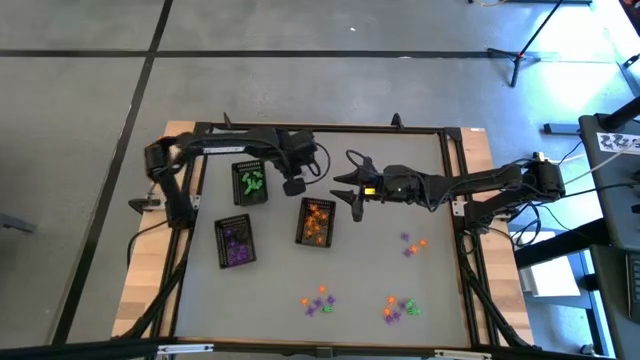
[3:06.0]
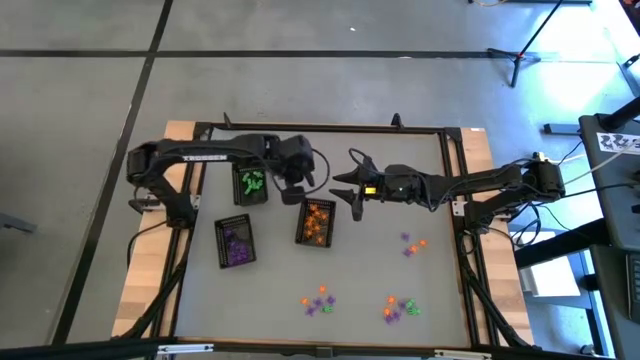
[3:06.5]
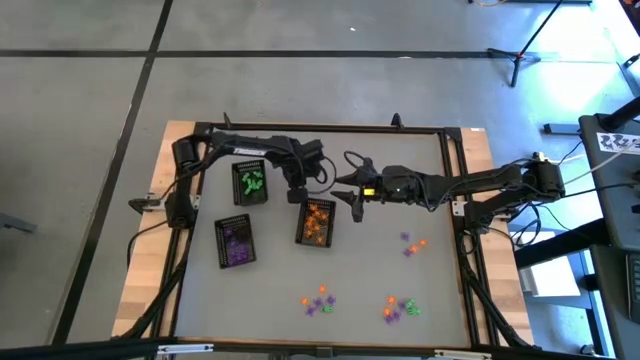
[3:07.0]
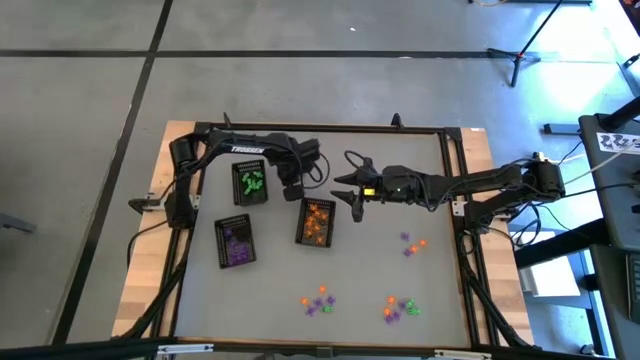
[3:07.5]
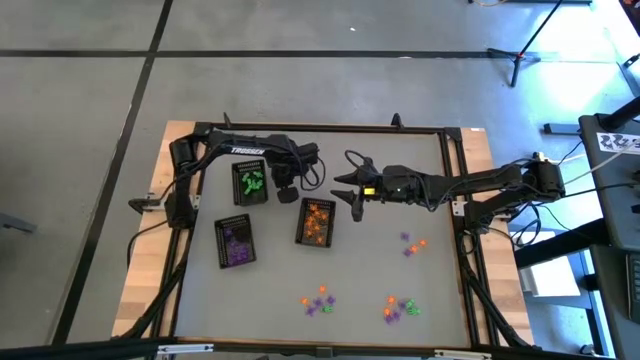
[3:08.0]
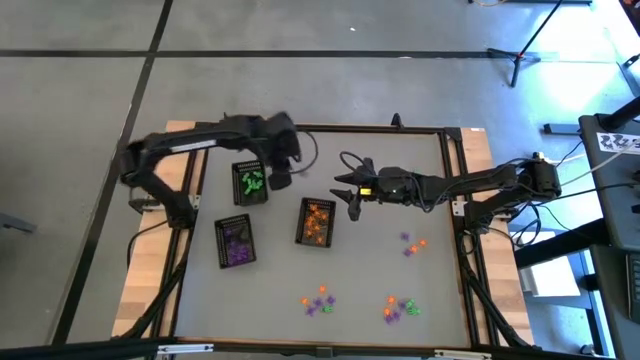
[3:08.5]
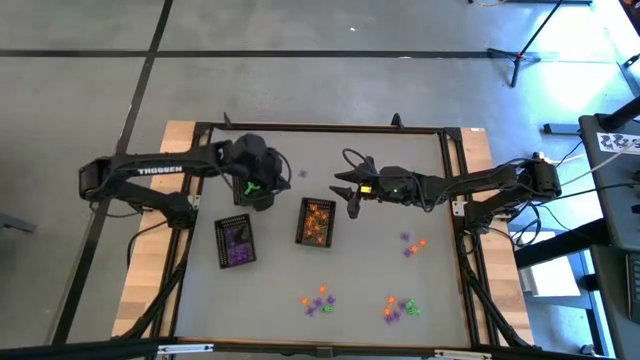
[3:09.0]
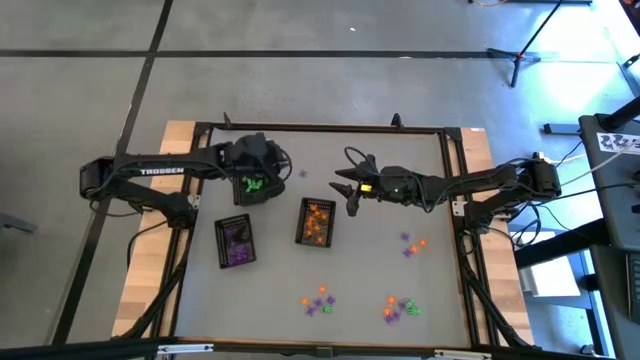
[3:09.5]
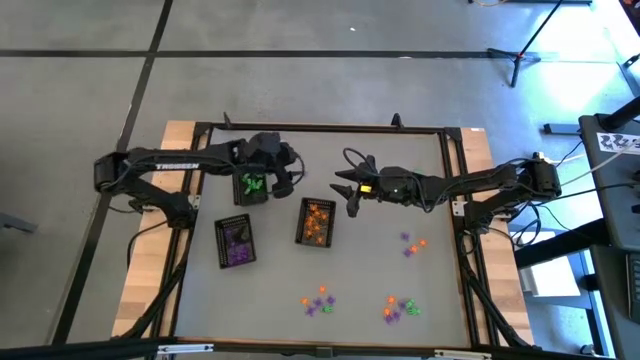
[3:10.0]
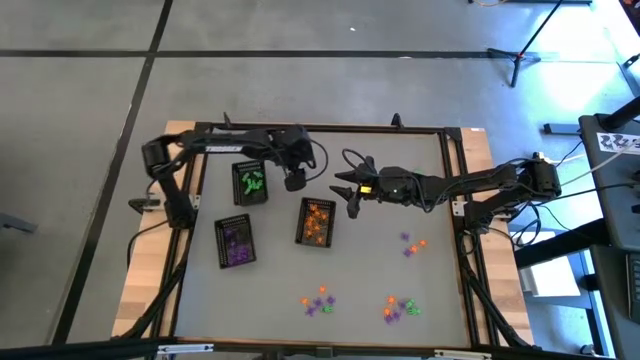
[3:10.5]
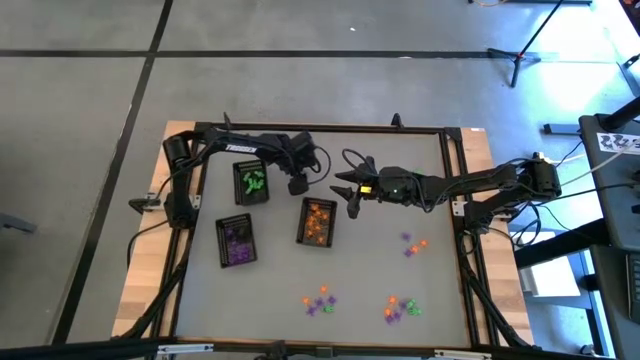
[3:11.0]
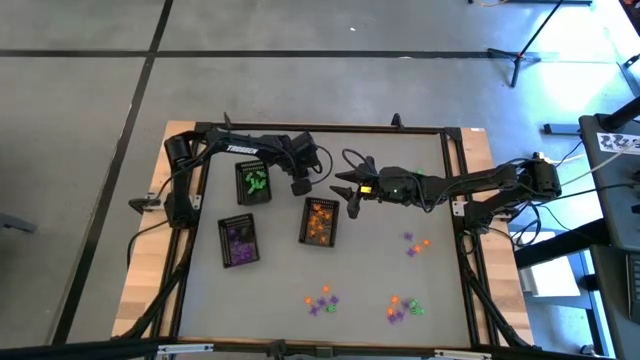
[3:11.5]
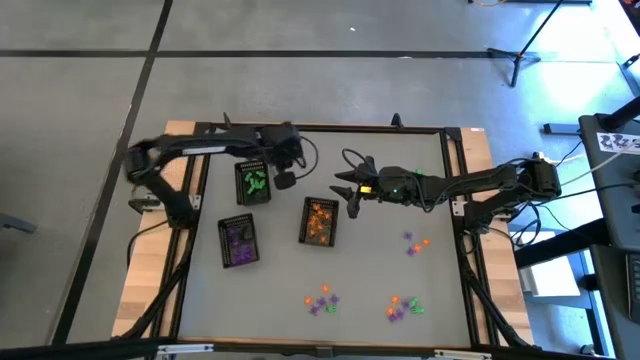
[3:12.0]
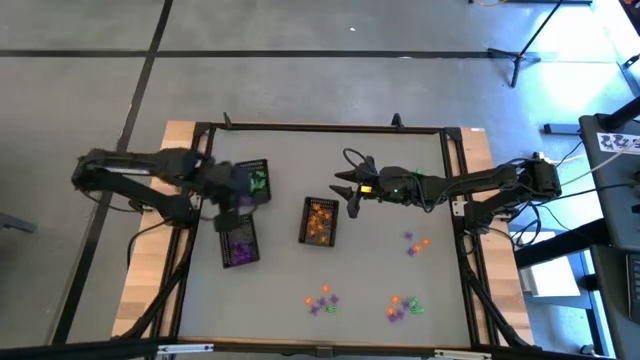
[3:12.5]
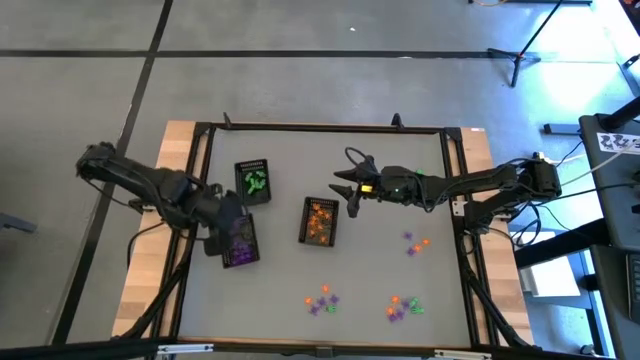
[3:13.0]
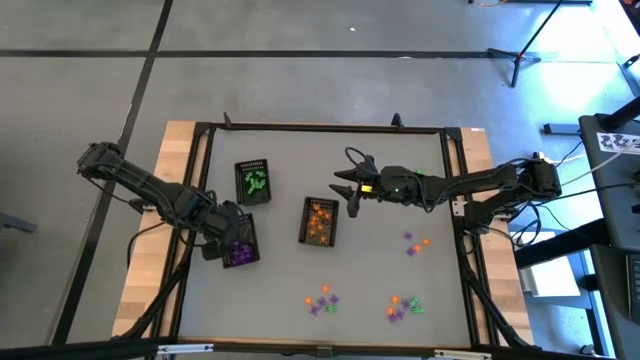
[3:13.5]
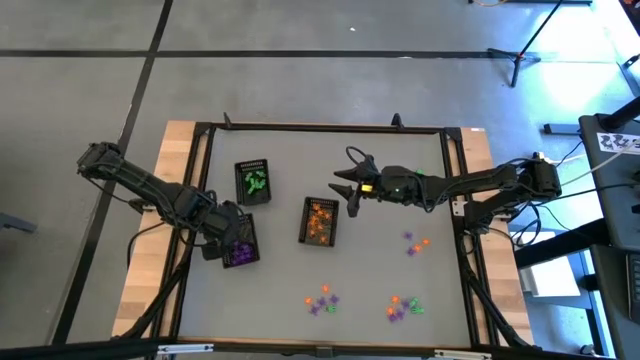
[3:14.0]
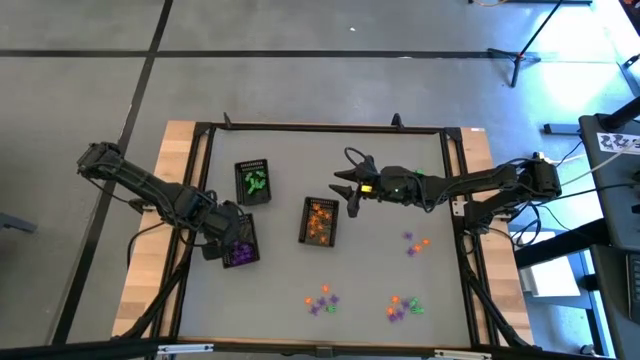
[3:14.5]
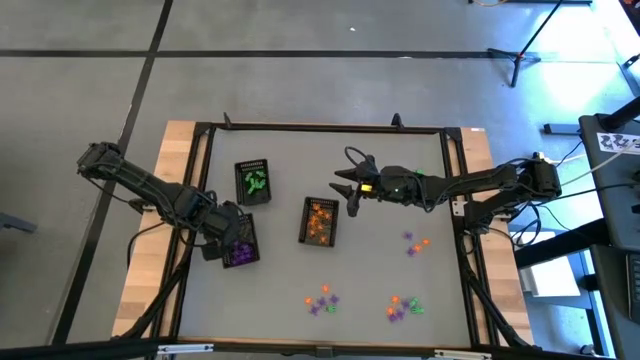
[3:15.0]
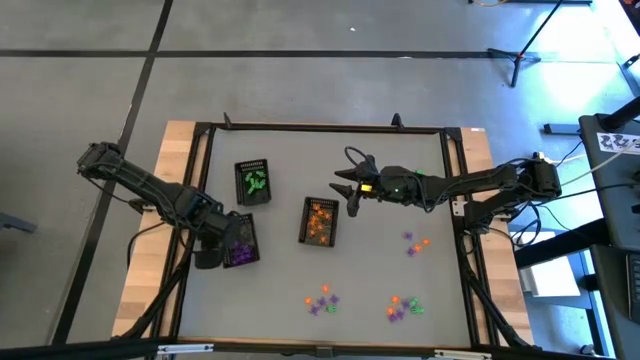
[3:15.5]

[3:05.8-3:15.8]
Task: Sort Halloween decoration
Put the purple spider toy into the bottom left black basket

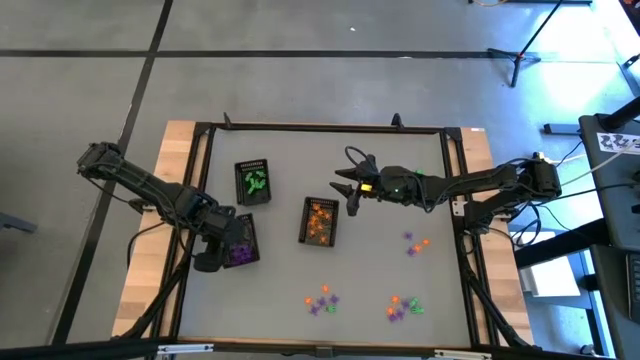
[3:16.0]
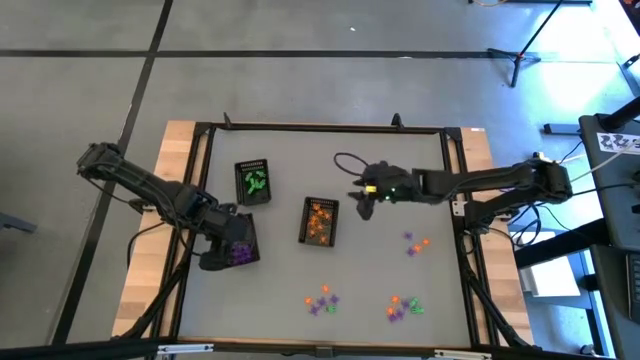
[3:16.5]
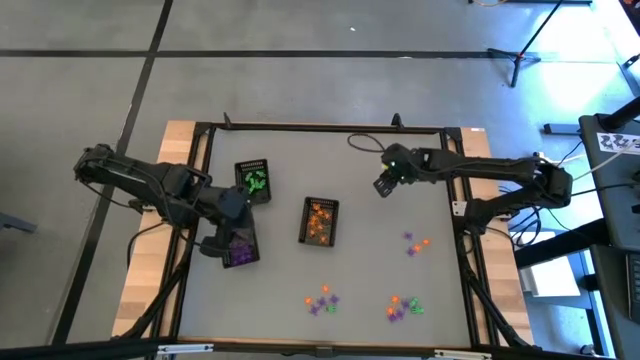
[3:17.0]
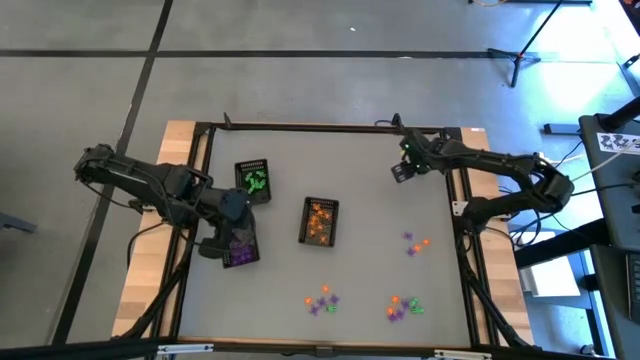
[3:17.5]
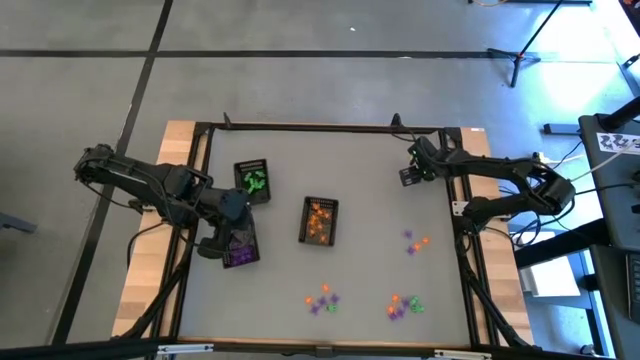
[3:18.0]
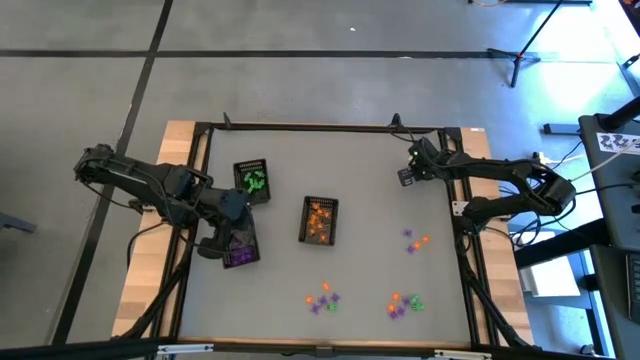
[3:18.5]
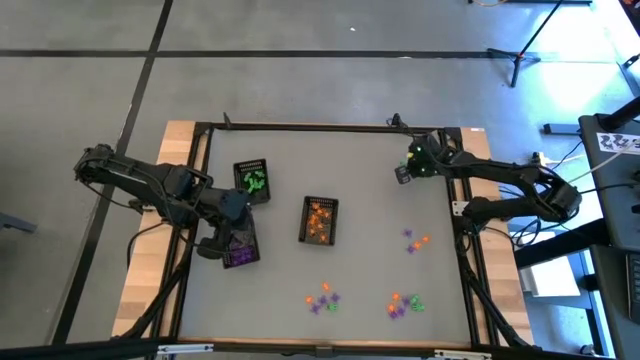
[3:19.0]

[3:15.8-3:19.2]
Put the green alien toy into the top left black basket

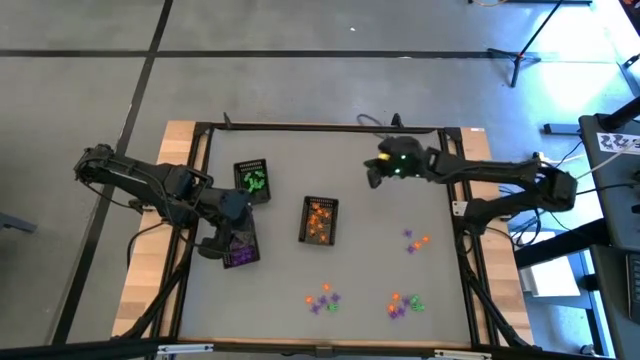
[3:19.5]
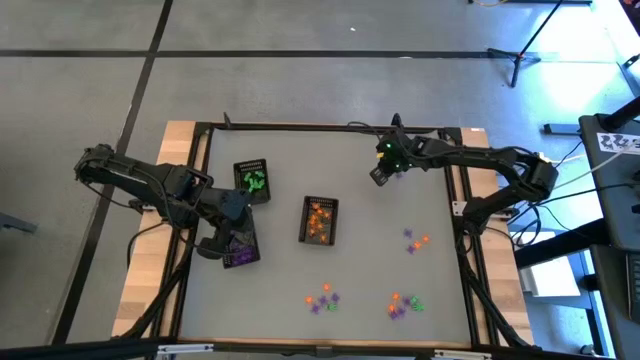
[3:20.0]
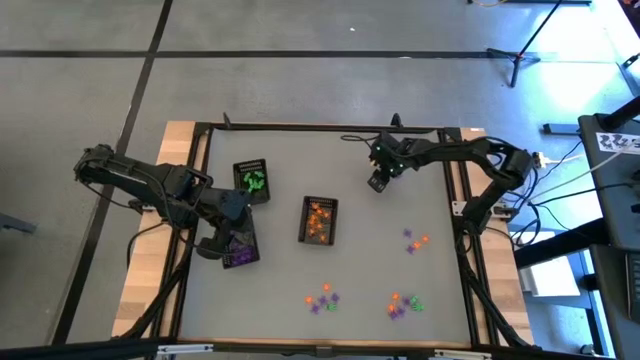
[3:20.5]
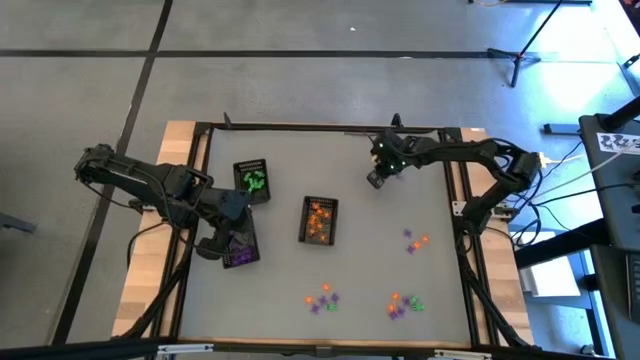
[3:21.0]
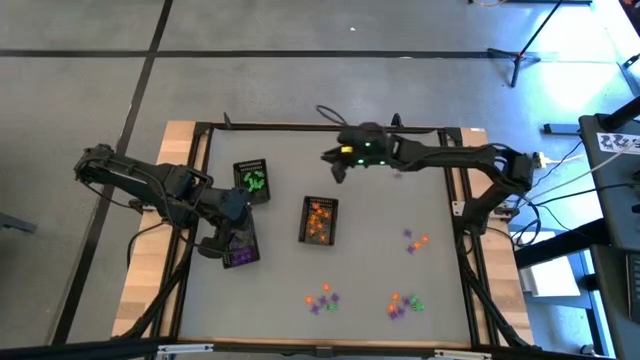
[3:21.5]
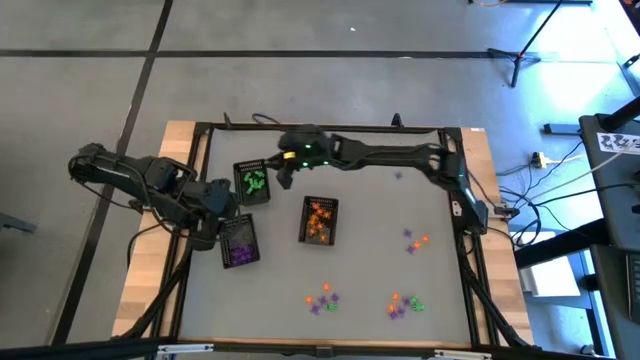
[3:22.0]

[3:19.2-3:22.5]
Put the green alien toy into the top left black basket

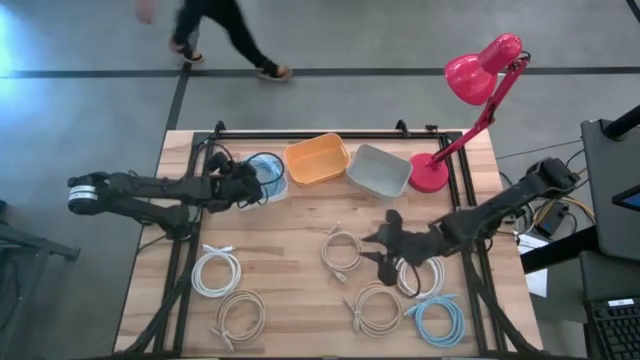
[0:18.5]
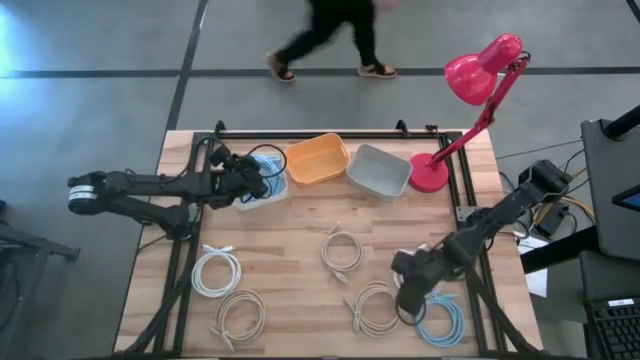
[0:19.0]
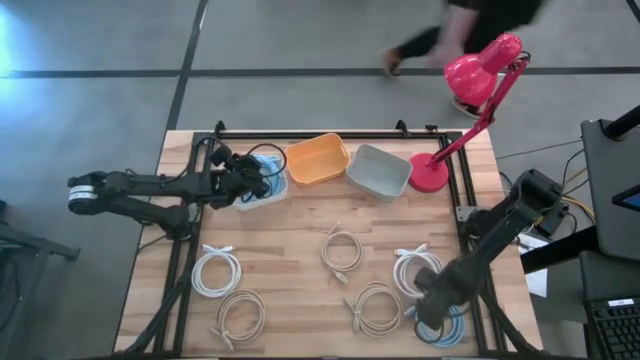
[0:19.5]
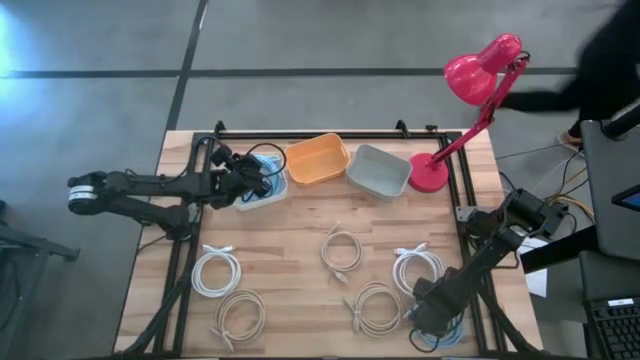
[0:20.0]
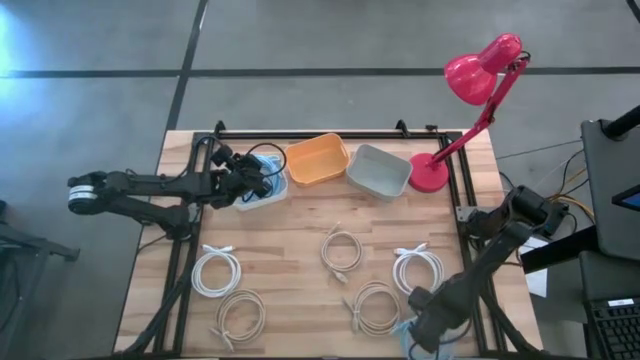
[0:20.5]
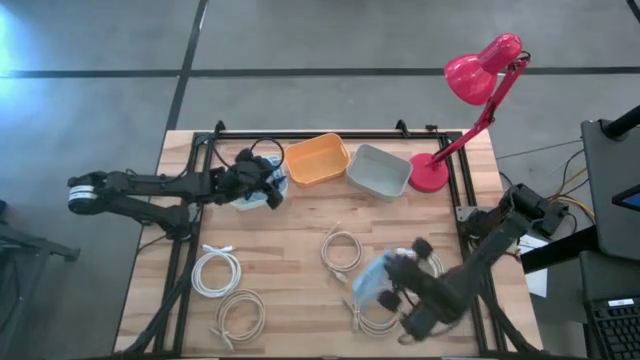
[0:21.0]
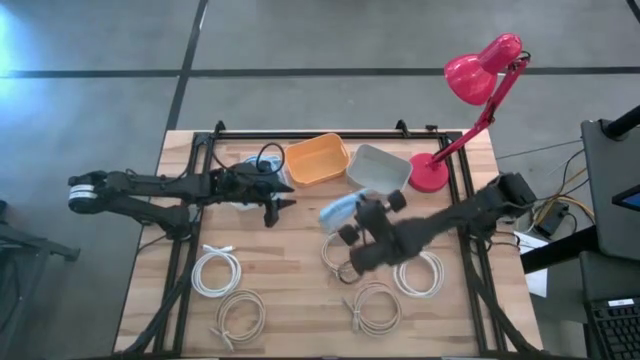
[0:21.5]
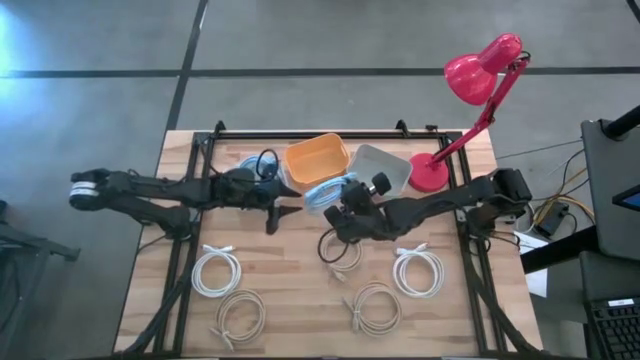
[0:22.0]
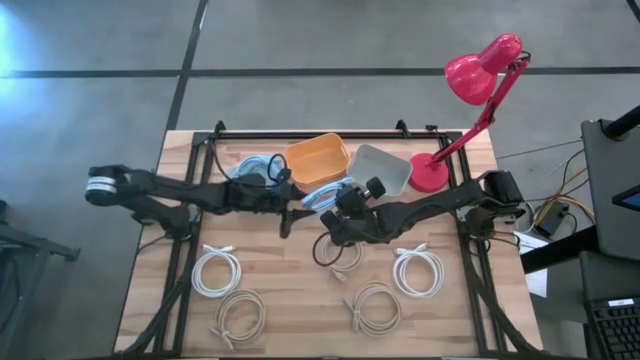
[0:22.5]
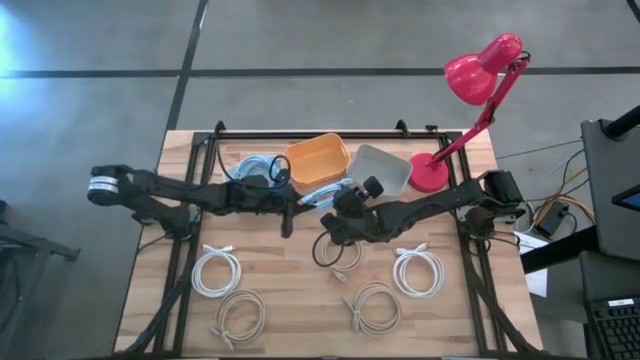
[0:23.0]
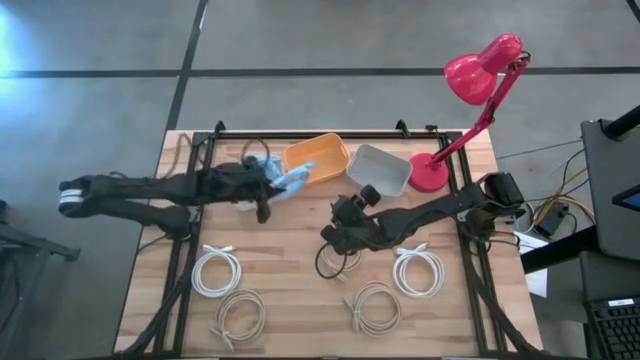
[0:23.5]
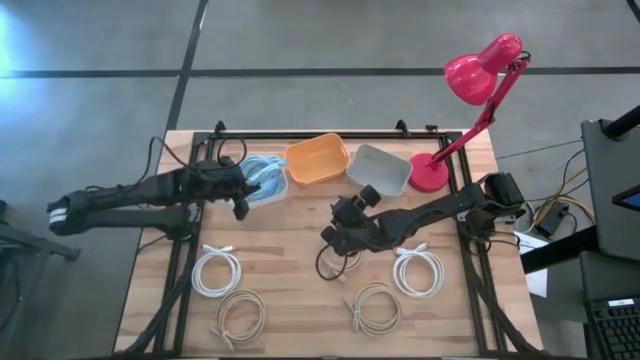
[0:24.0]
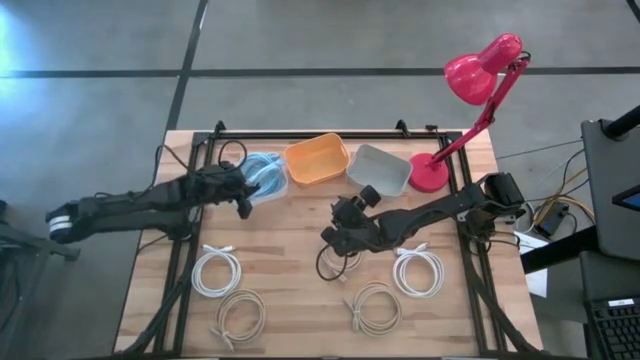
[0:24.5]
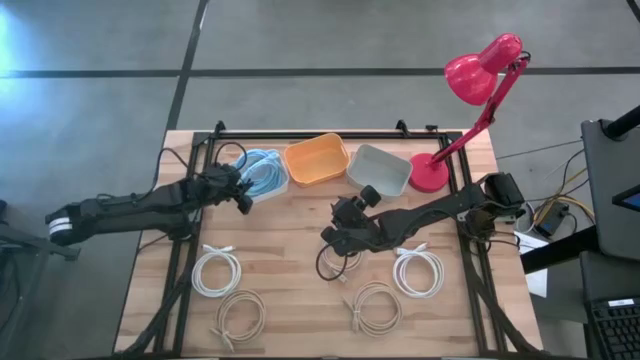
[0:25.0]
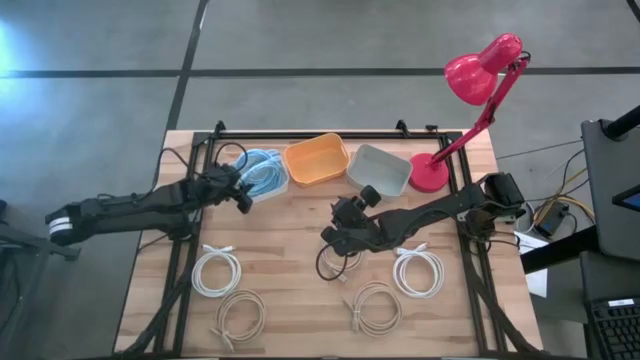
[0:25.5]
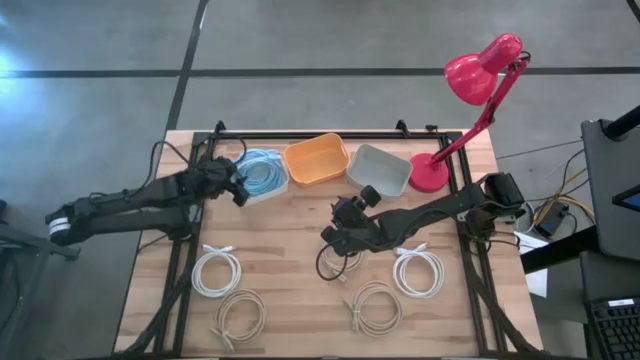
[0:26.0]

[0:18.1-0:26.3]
Task: Pick & Place USB Port
Put the blue charger cable into the white bin
